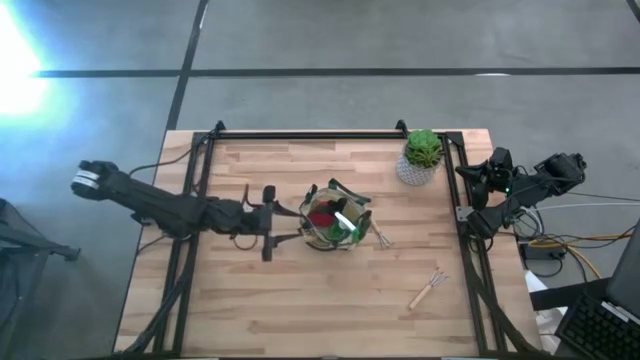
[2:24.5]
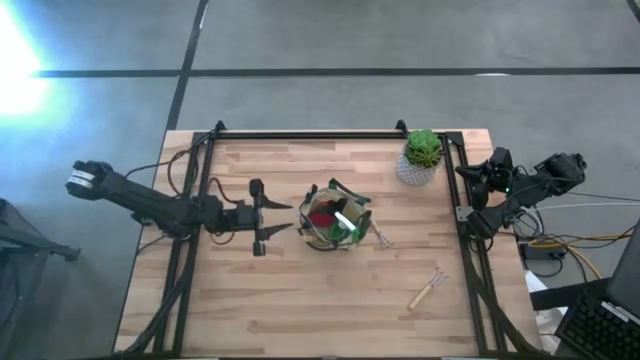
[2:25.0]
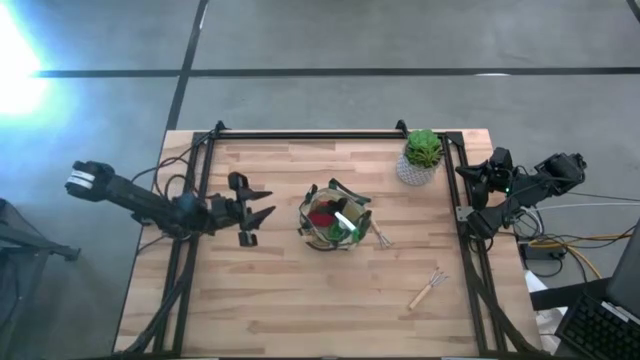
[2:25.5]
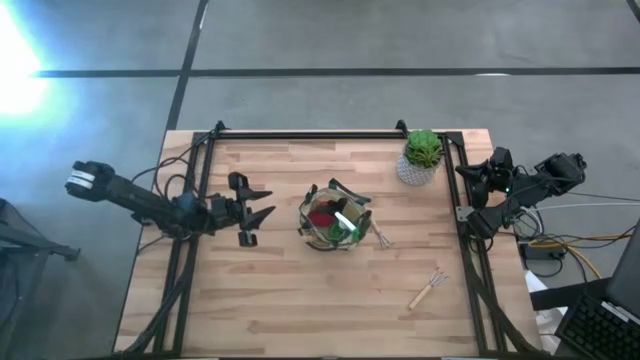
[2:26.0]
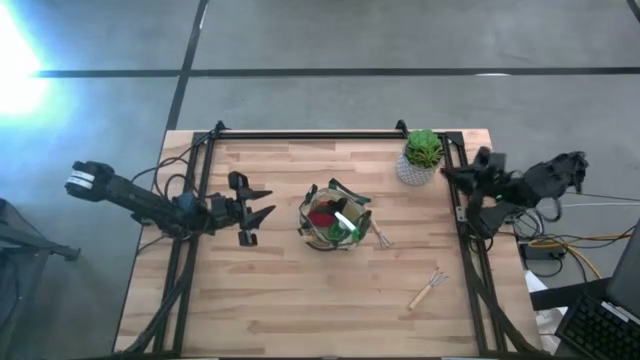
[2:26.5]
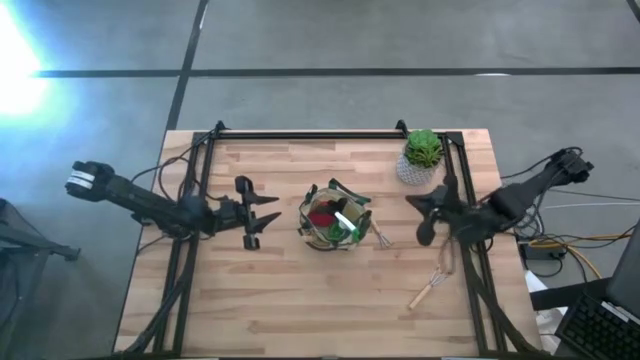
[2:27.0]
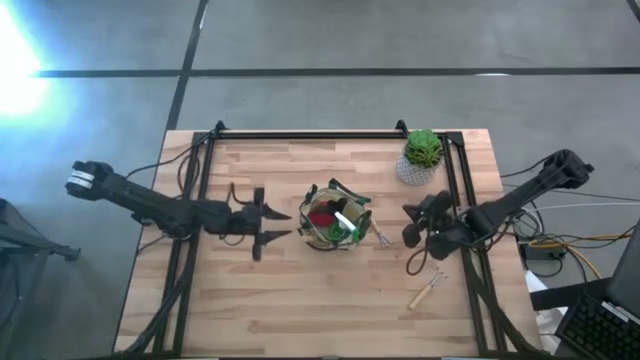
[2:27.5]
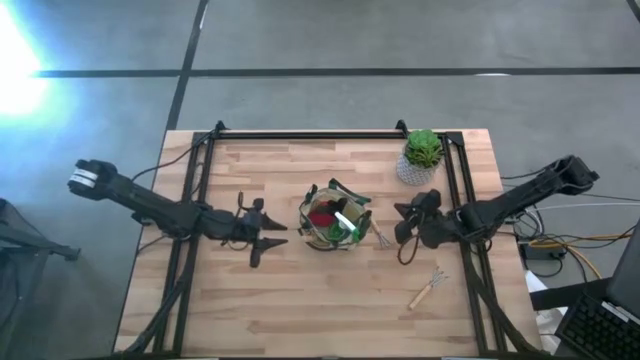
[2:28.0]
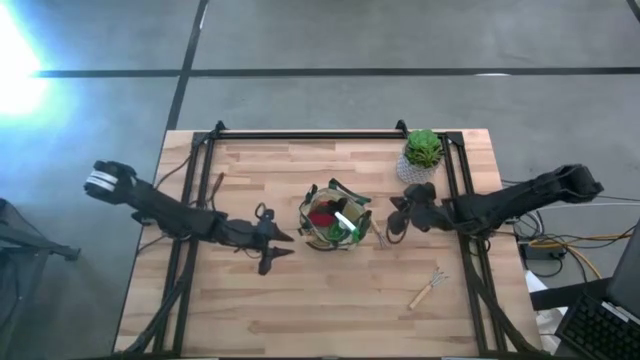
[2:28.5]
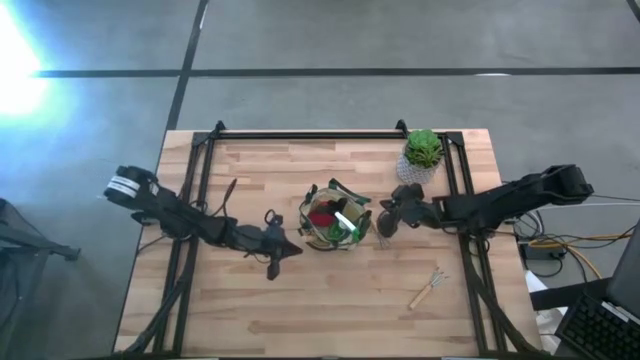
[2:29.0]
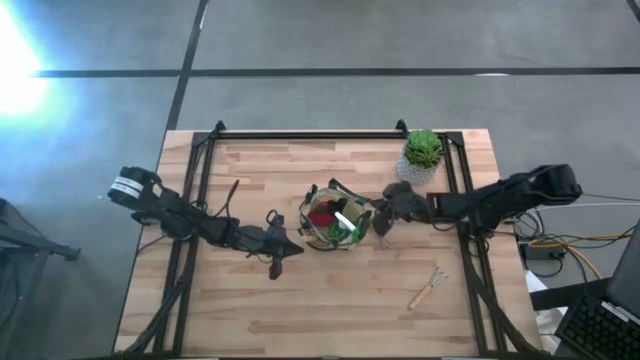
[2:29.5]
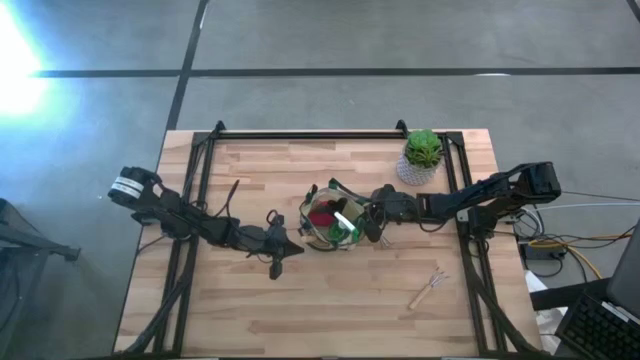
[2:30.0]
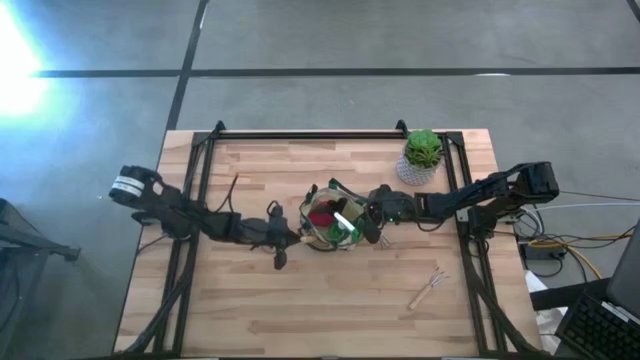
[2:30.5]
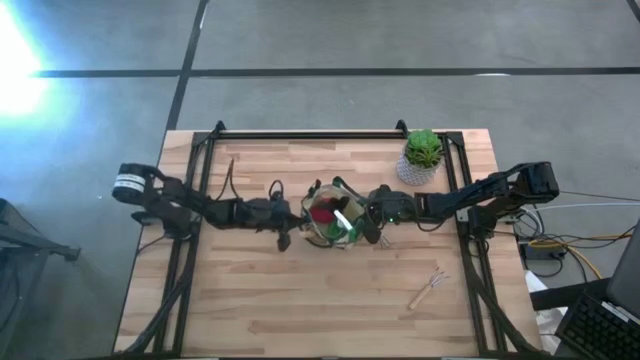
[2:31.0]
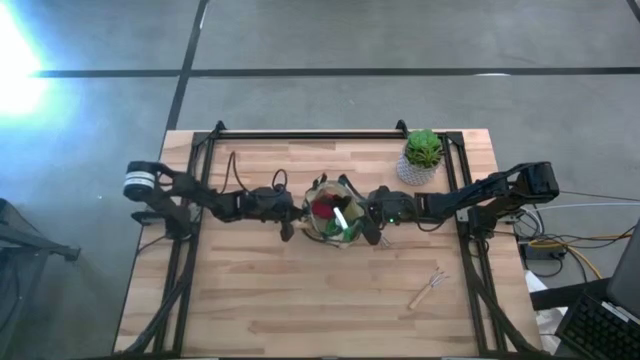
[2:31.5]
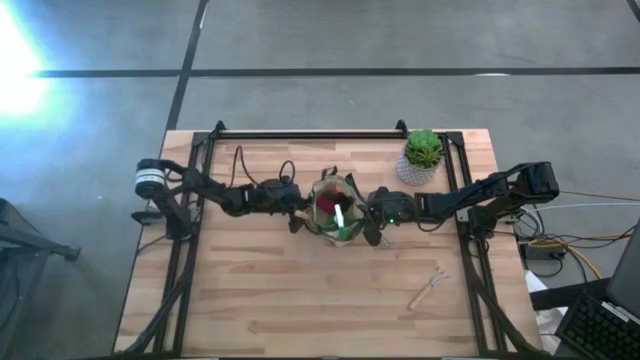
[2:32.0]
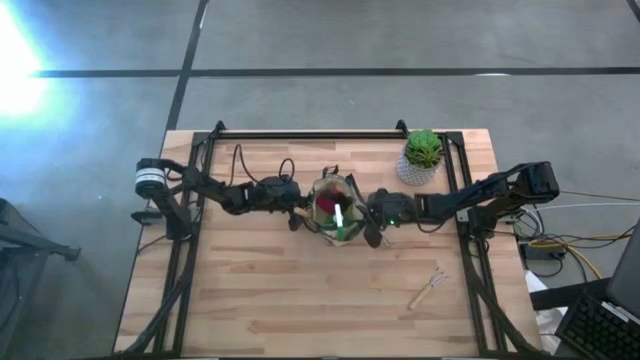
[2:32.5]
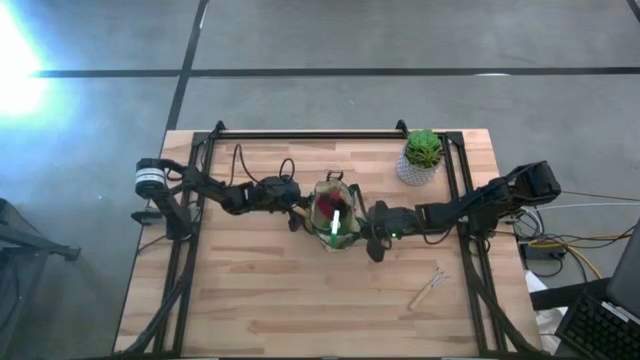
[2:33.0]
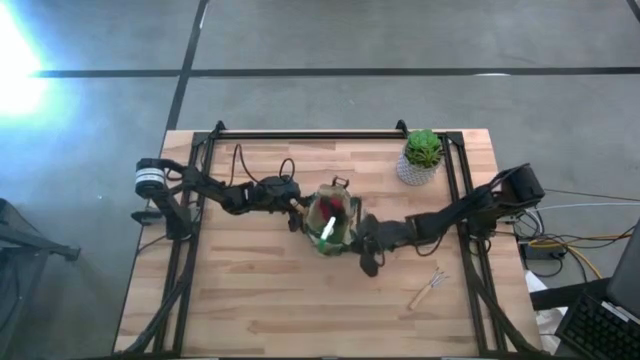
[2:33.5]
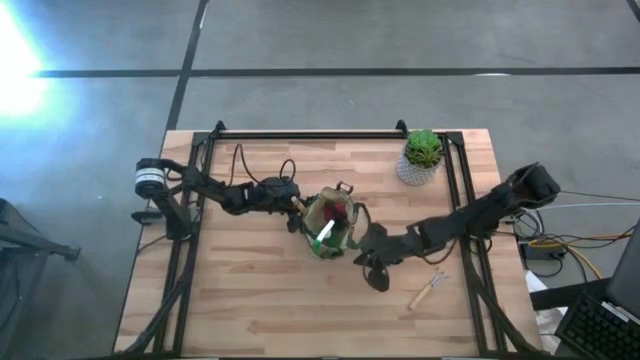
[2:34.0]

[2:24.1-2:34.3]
Task: Pick & Place Garden tools in Gardening bag
Adjust the light brown gardening bag on the table

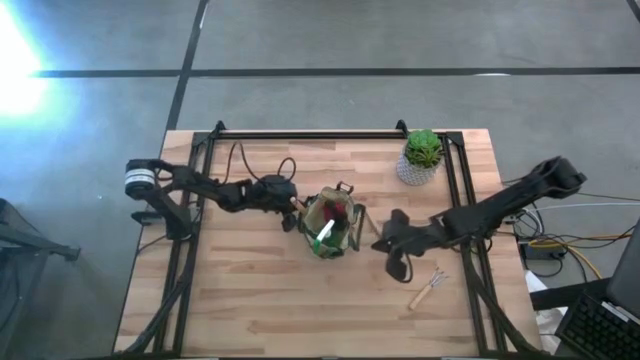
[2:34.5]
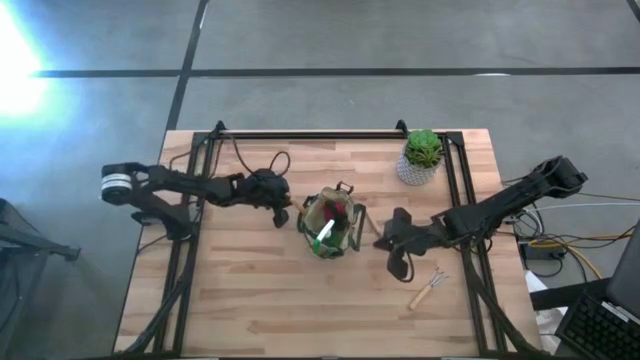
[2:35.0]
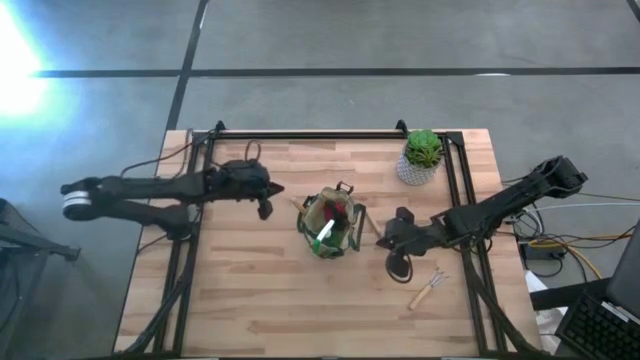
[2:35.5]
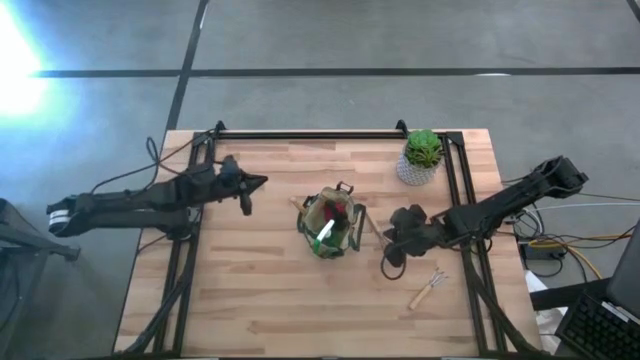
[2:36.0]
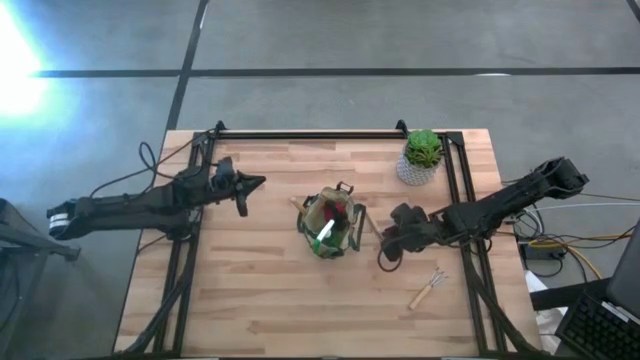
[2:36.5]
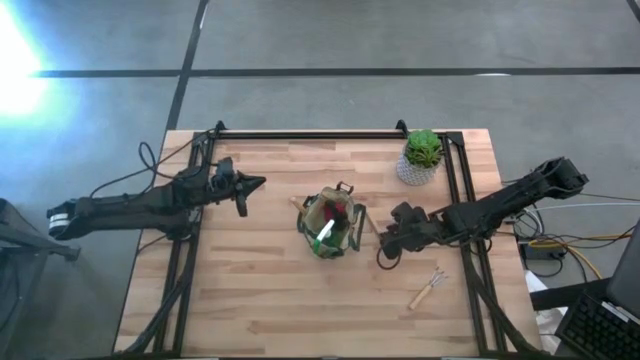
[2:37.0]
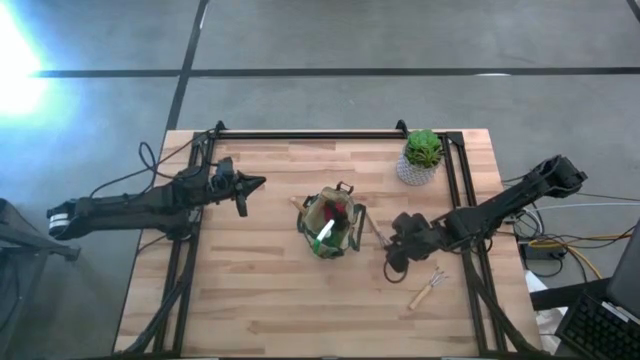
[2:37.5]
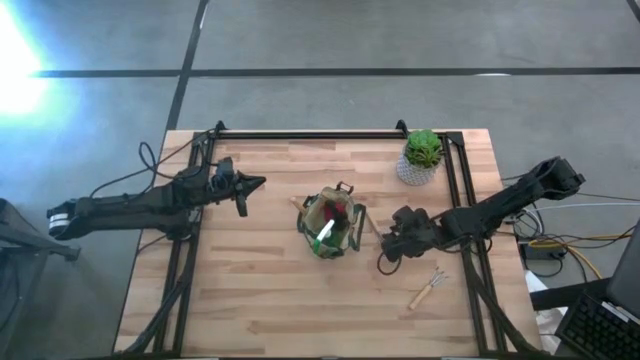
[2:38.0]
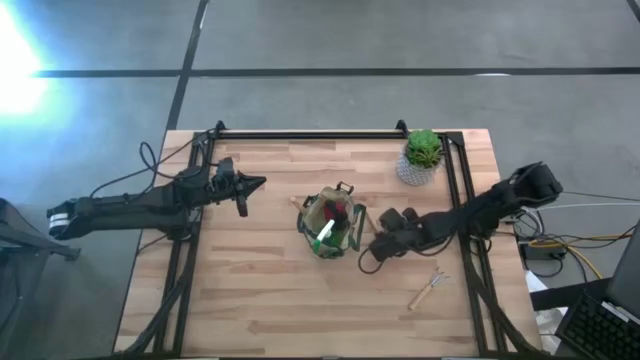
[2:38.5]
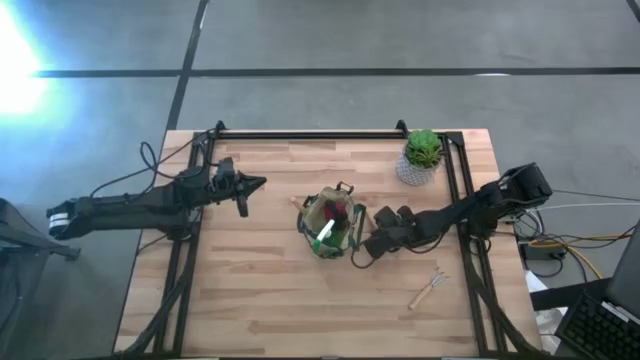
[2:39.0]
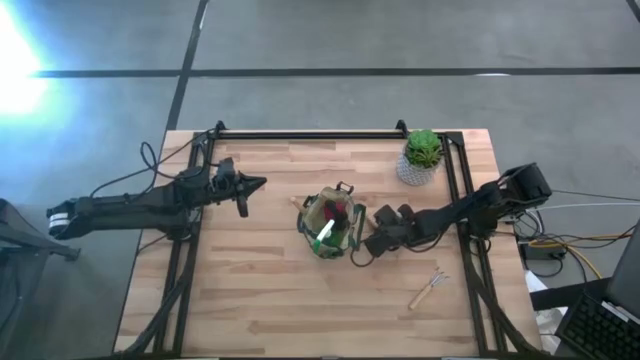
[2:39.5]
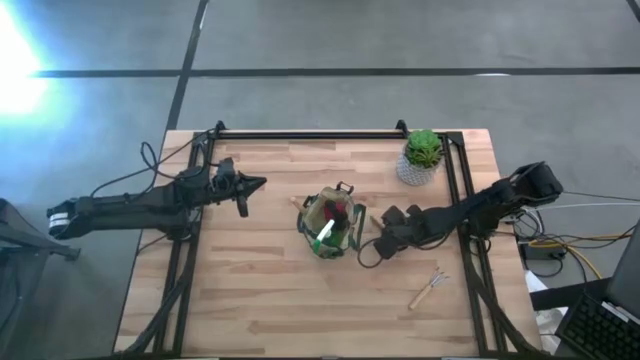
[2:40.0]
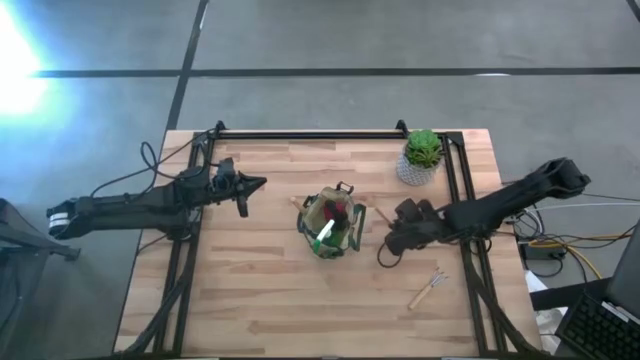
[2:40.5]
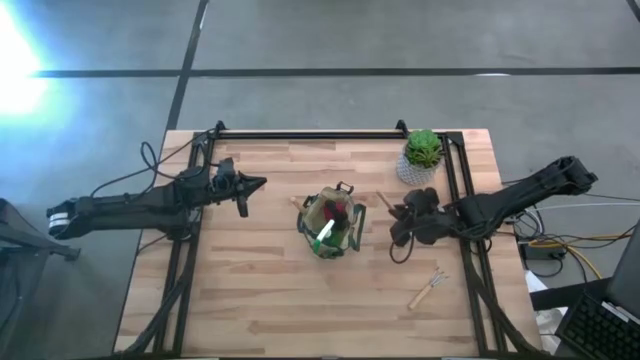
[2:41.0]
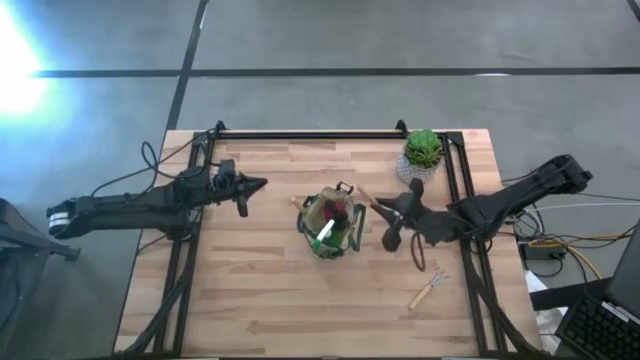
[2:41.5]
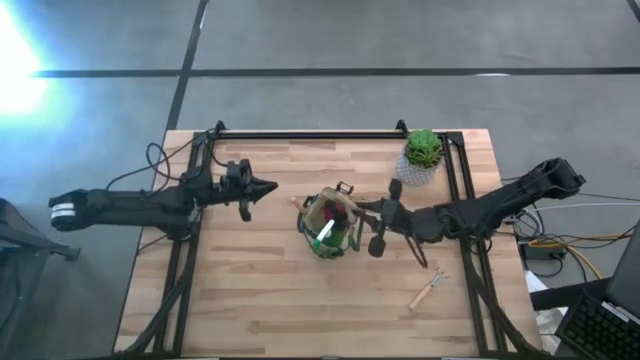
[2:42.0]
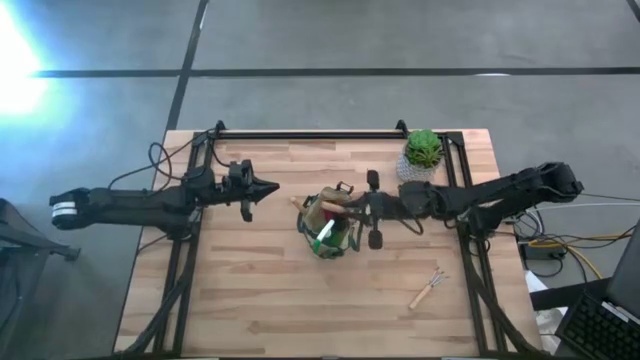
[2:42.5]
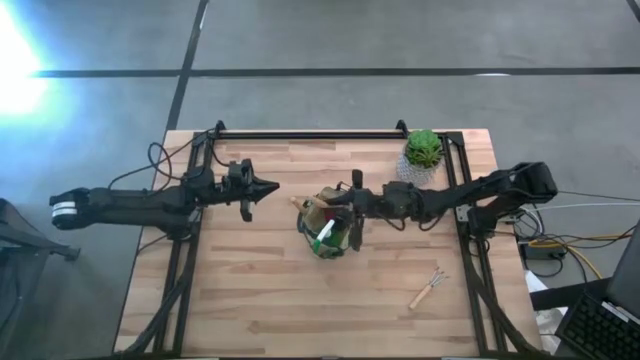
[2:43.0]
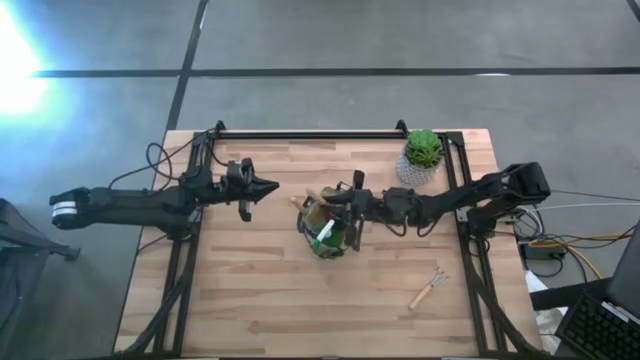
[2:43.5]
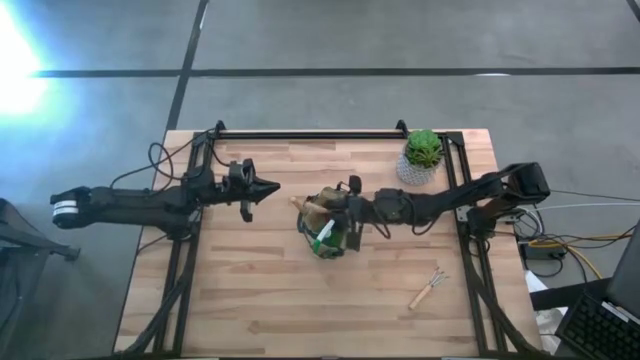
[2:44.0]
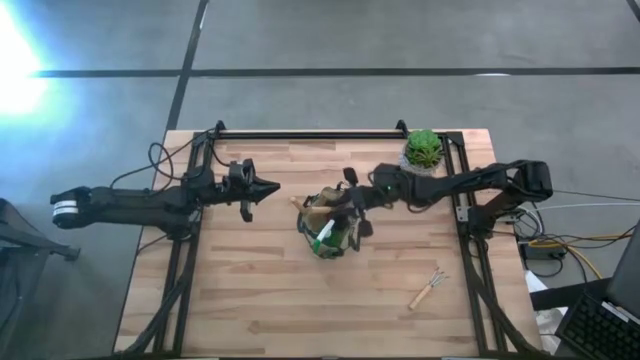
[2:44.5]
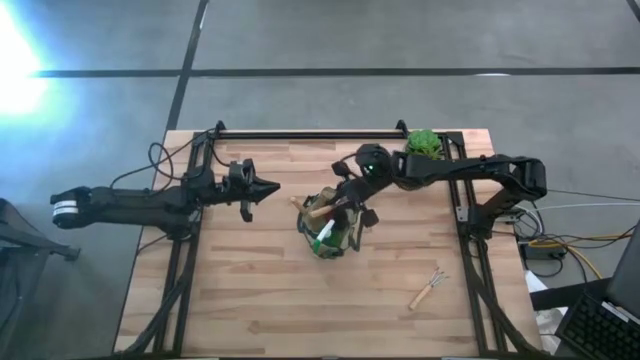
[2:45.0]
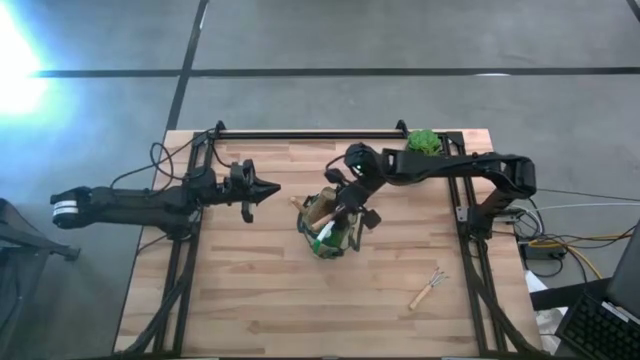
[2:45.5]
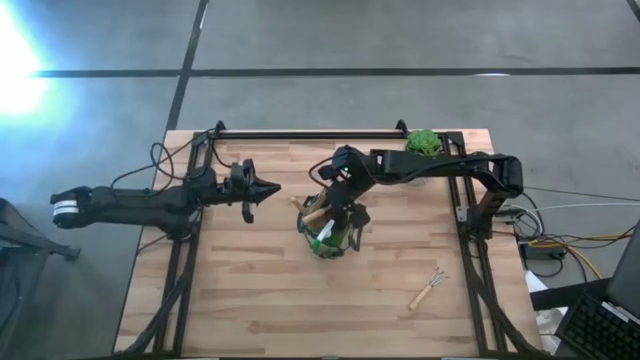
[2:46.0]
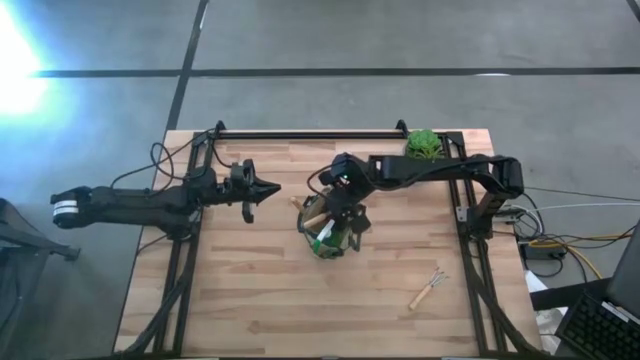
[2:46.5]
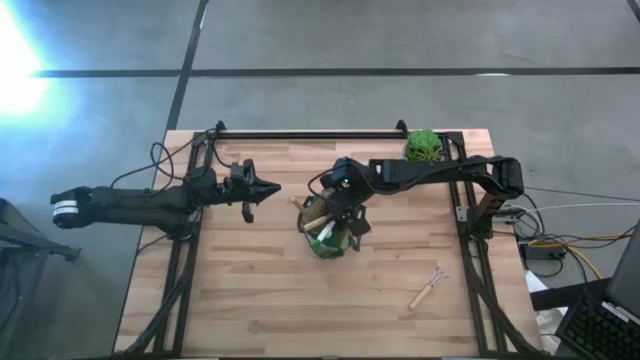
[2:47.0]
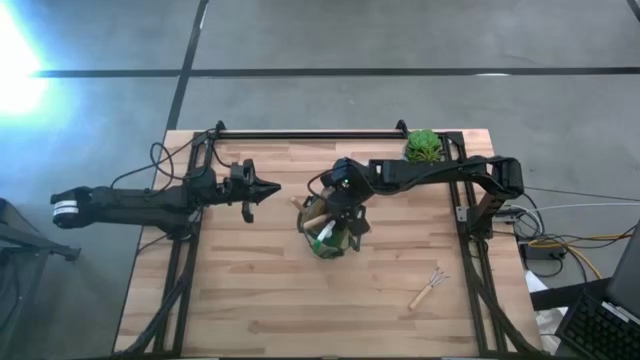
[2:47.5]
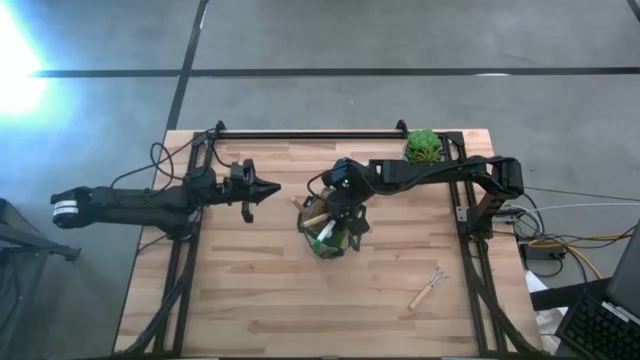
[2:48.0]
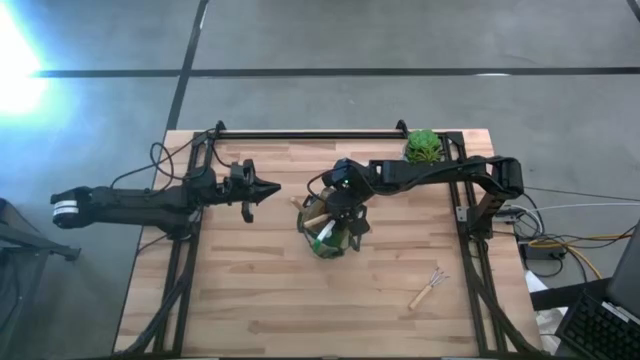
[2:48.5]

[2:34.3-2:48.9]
Put the top brown hand rake into the light brown gardening bag
